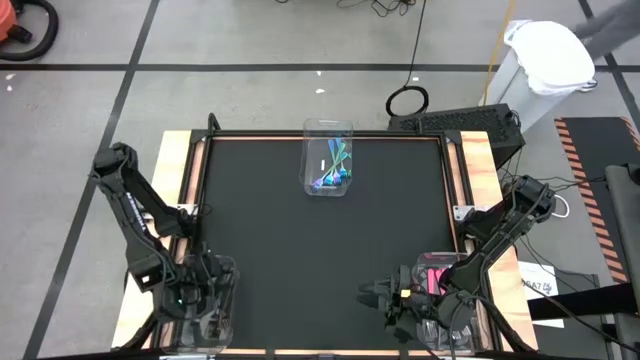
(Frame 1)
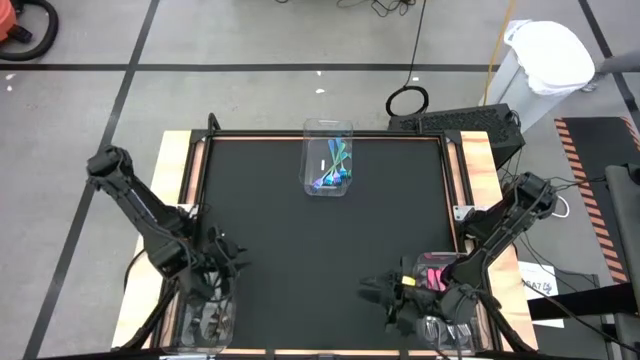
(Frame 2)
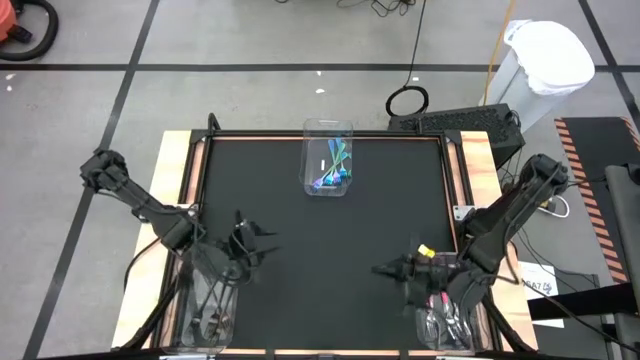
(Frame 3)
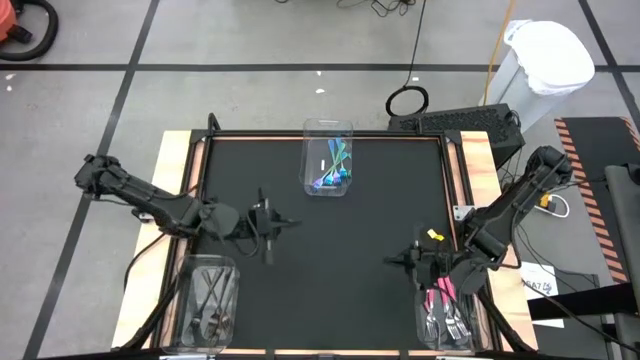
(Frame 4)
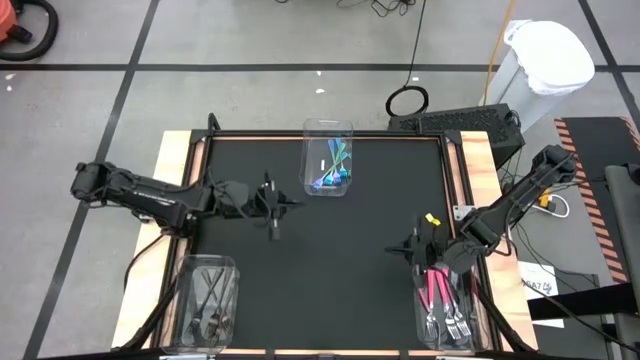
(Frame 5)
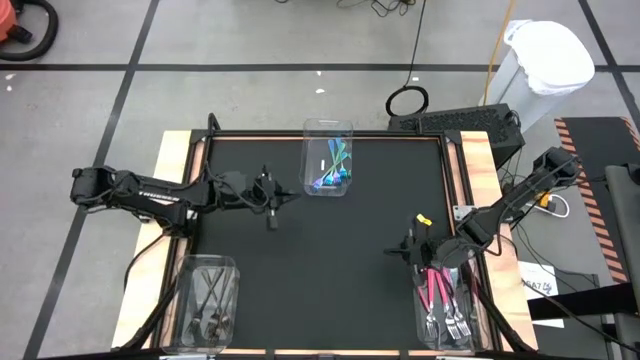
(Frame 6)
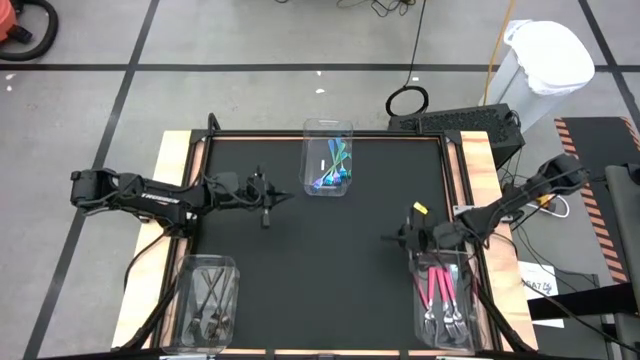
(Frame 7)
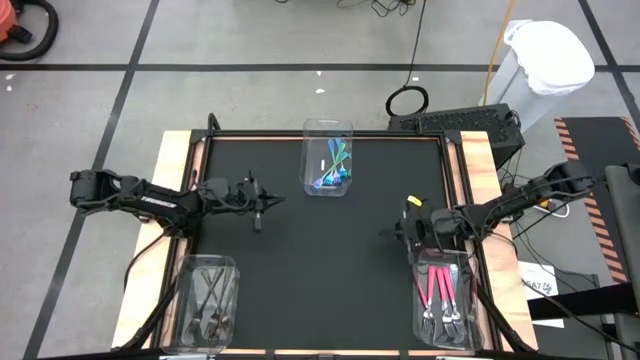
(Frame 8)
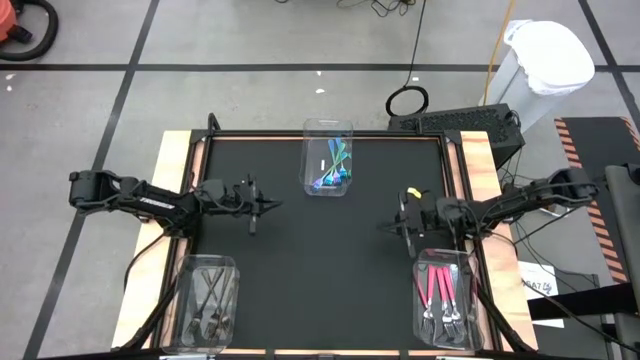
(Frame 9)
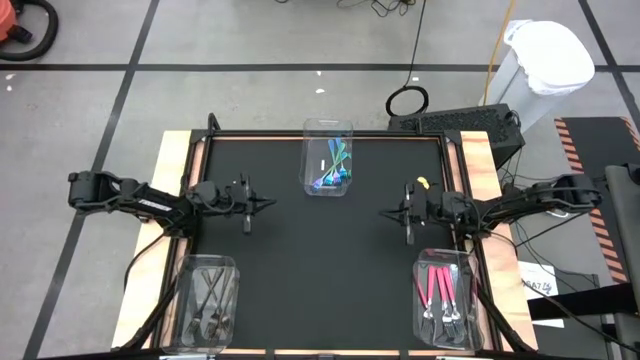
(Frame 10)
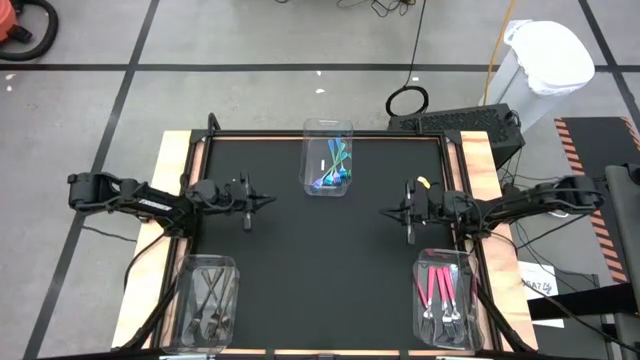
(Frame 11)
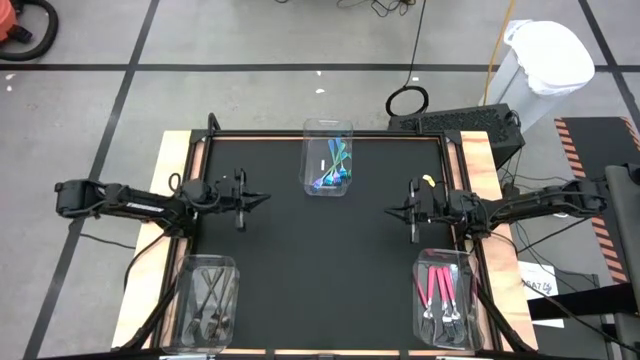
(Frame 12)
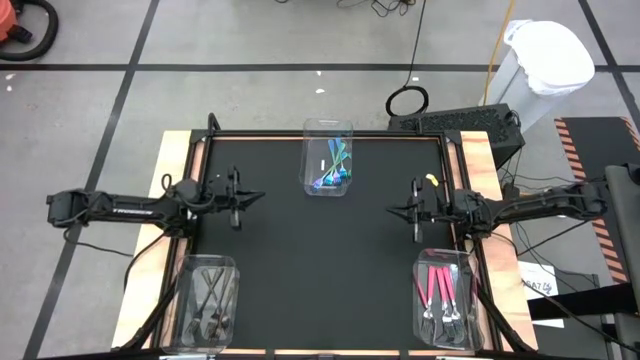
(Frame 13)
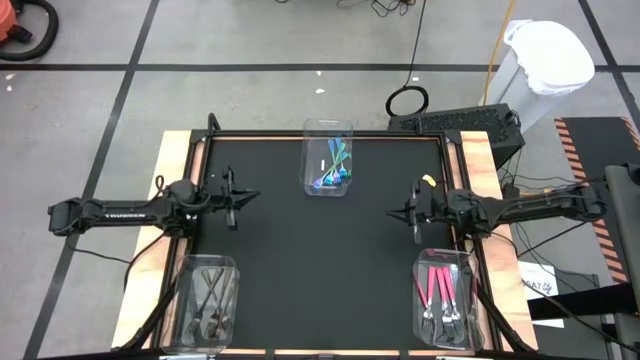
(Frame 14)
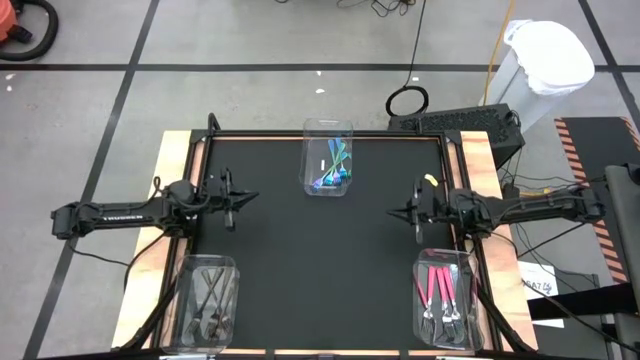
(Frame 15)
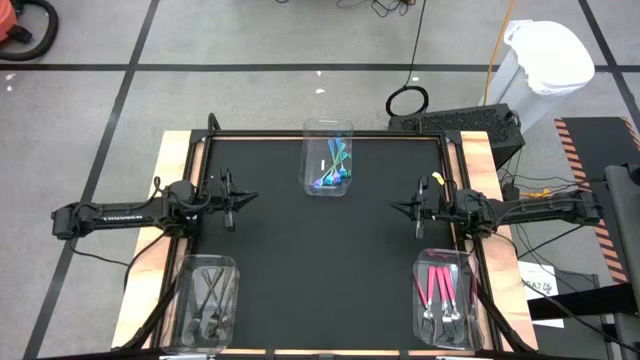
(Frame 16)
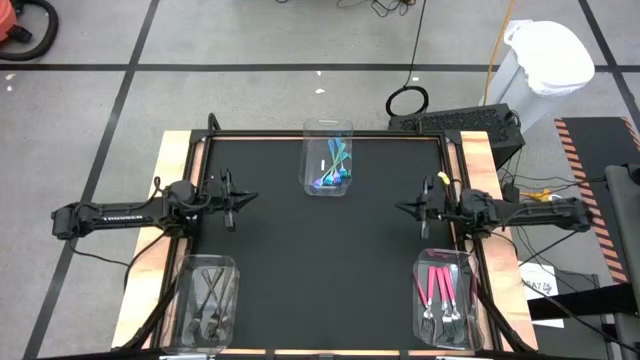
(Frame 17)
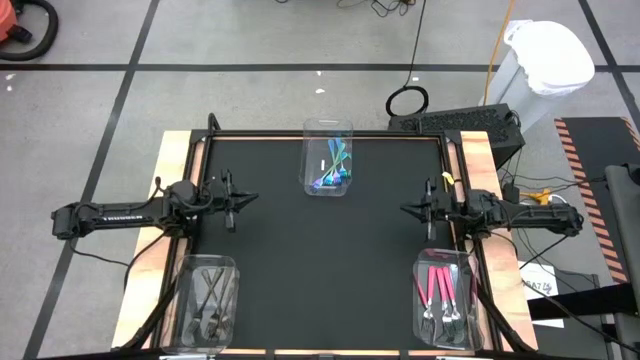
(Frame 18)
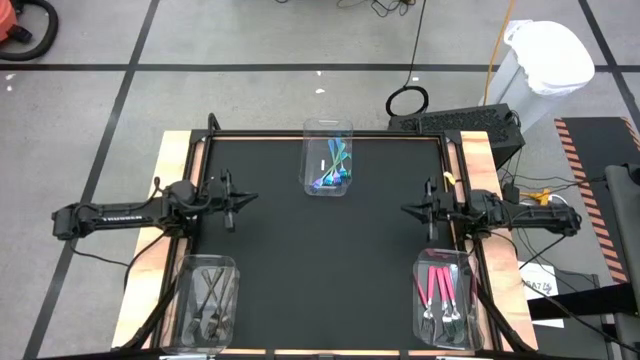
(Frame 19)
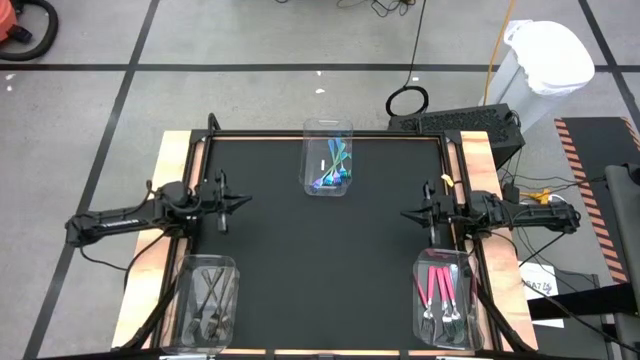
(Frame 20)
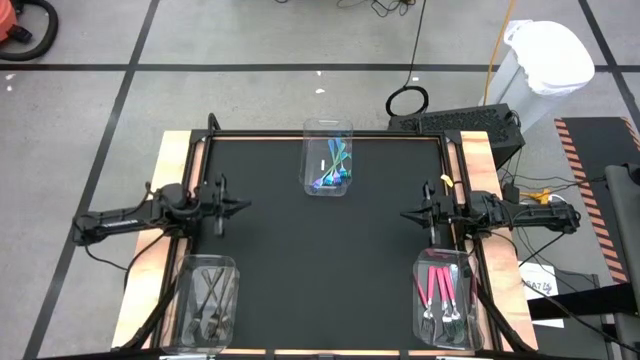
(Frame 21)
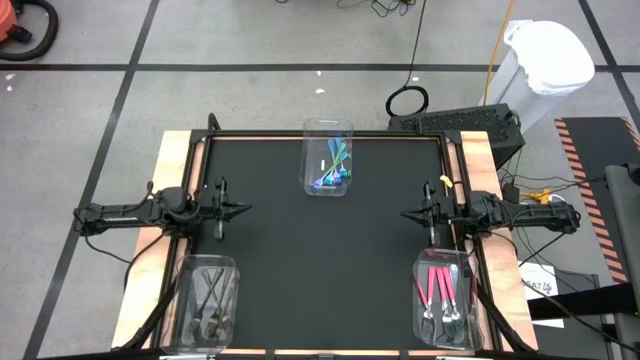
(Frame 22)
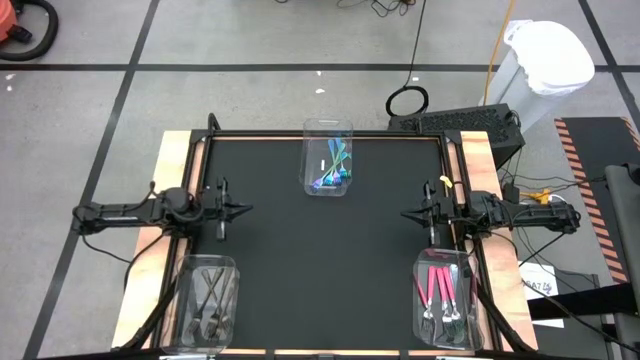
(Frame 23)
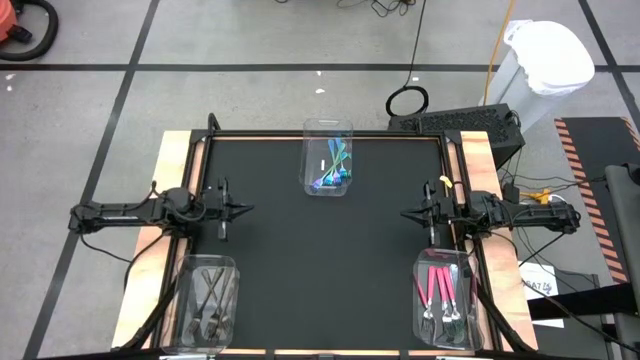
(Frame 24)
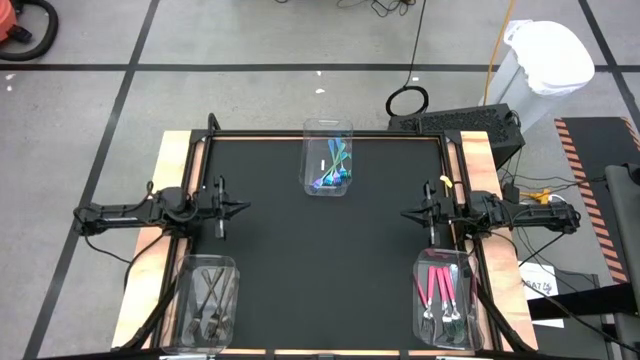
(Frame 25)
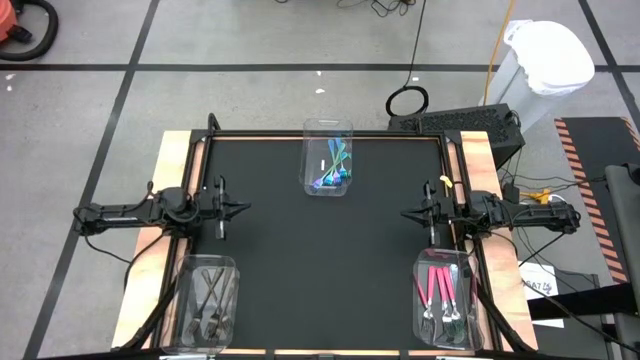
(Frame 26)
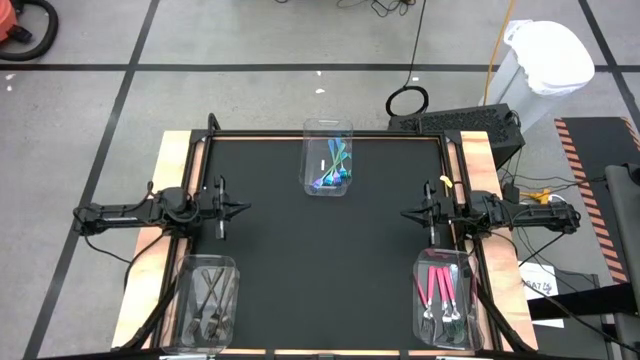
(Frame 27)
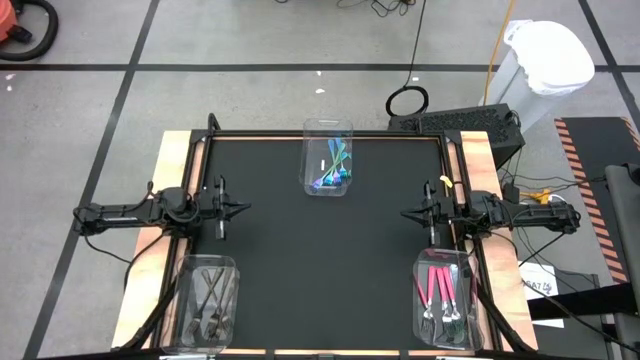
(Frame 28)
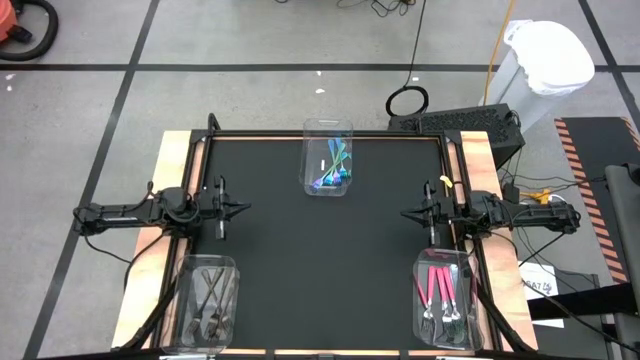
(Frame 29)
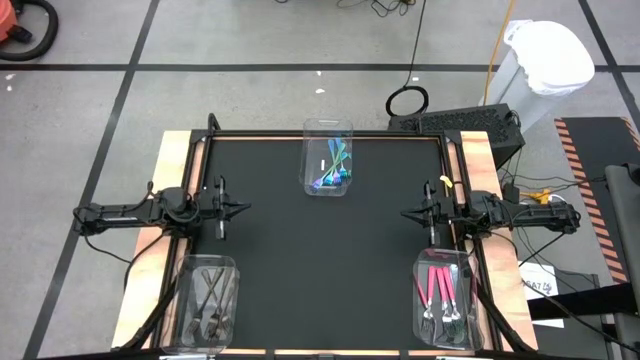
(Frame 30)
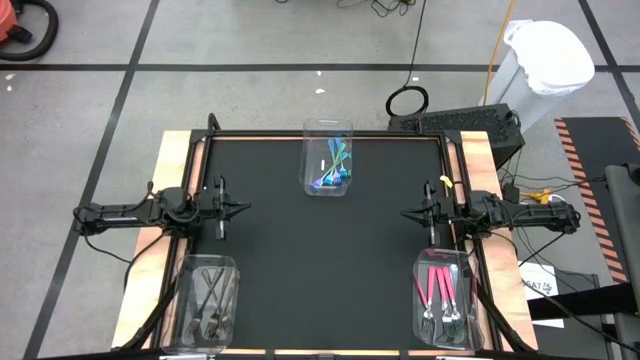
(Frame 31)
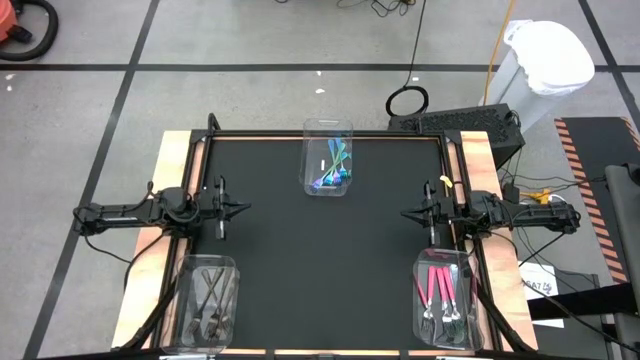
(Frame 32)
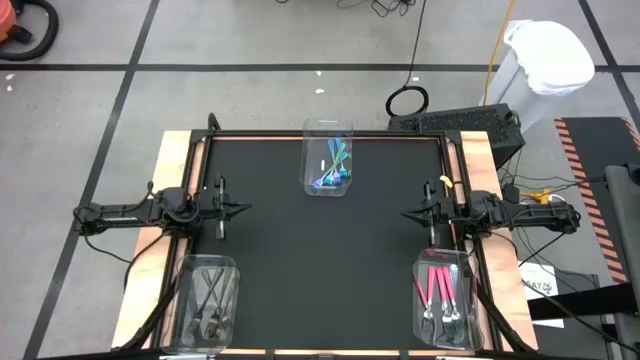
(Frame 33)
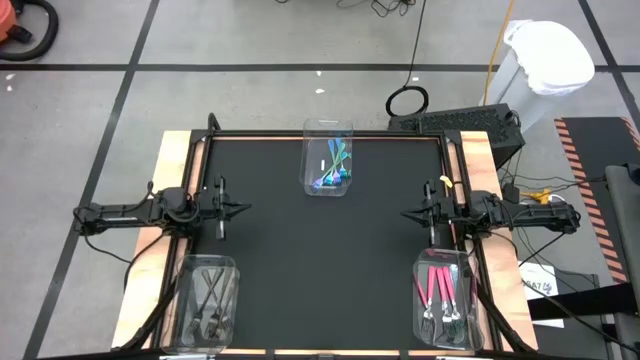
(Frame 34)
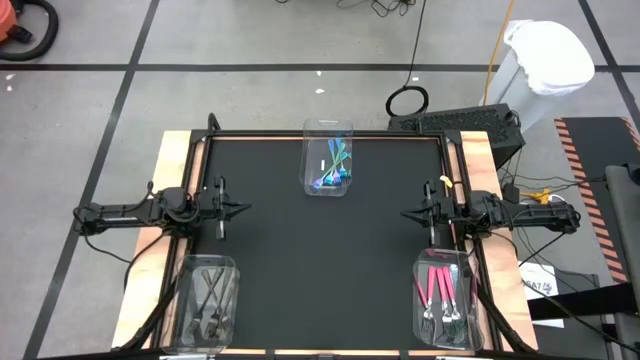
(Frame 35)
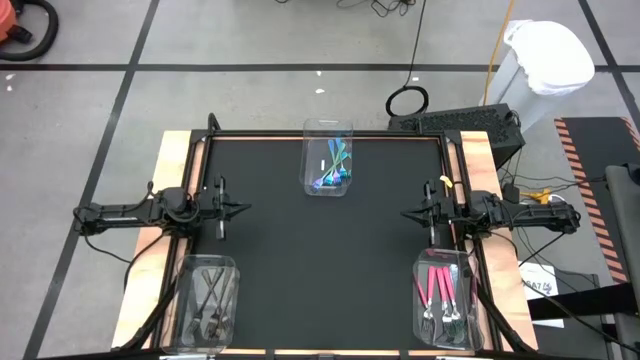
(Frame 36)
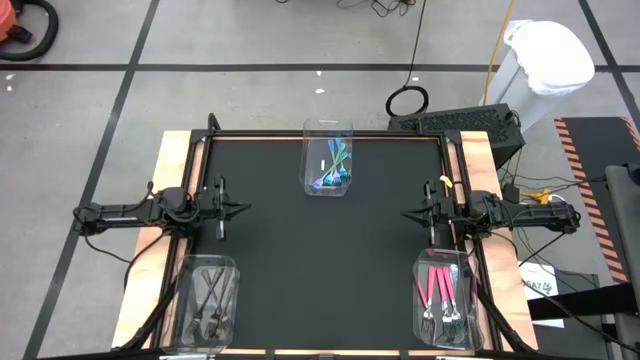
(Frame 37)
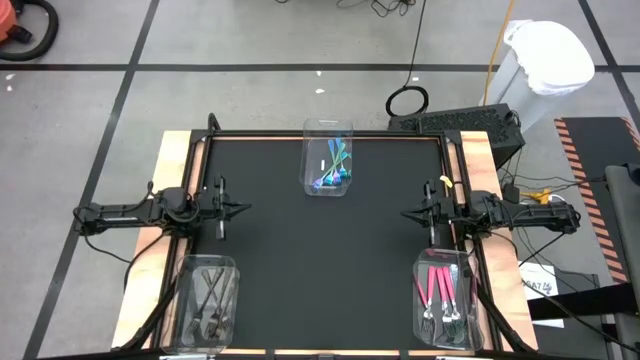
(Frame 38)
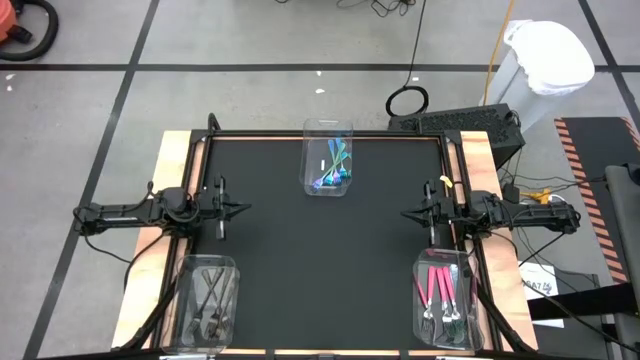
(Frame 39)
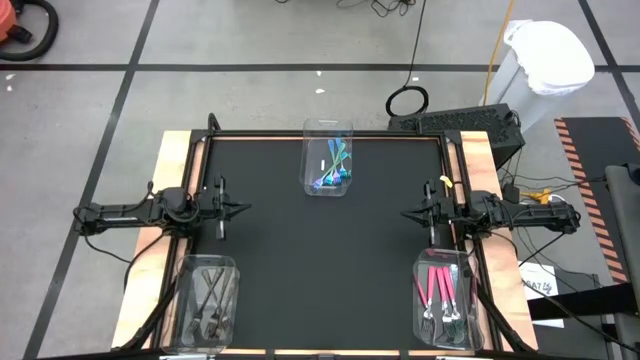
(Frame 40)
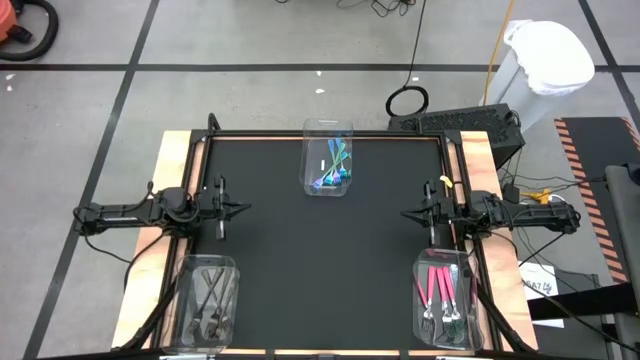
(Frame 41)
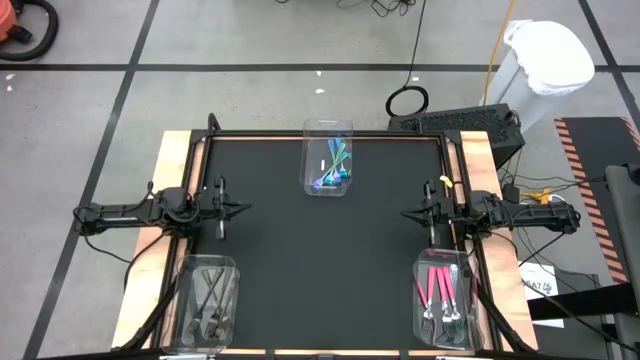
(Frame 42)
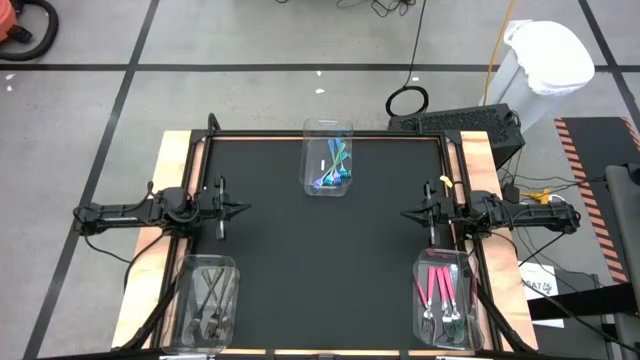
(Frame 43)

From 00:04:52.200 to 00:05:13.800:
Task: Sort silverware by color (type)
Return to Home Position
